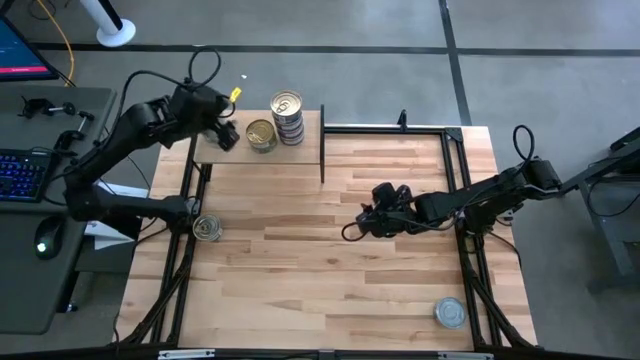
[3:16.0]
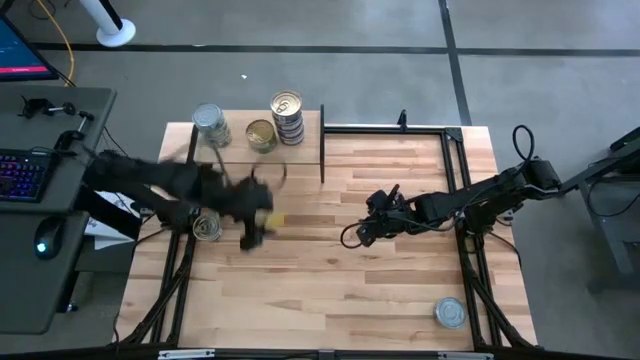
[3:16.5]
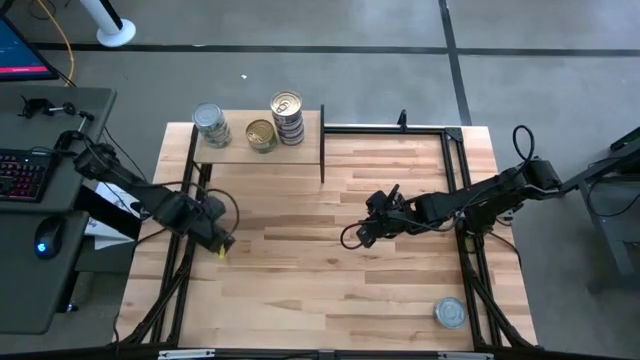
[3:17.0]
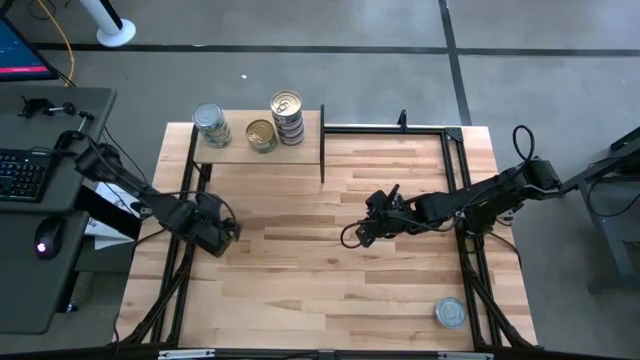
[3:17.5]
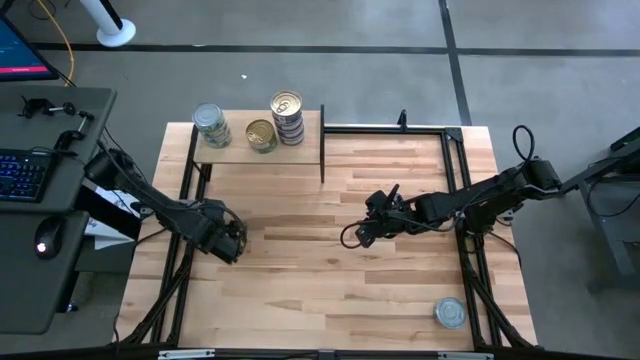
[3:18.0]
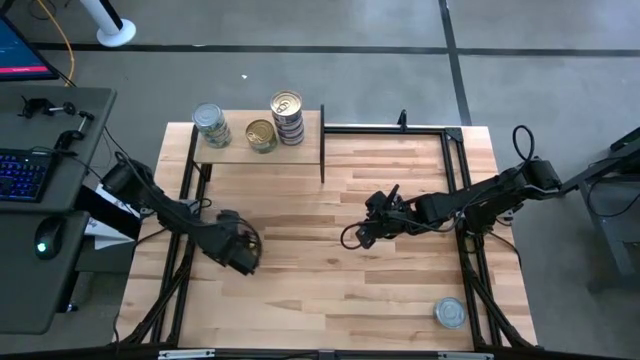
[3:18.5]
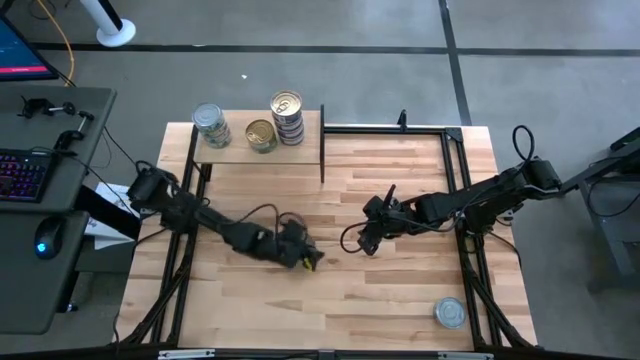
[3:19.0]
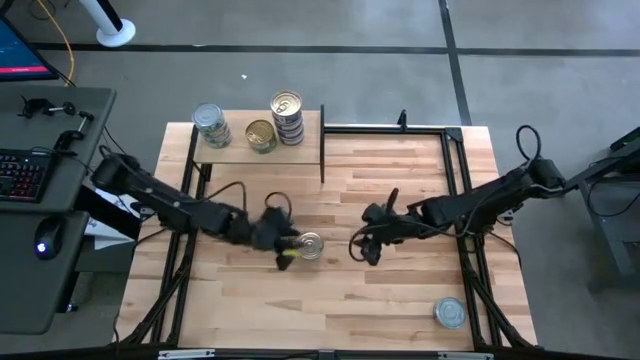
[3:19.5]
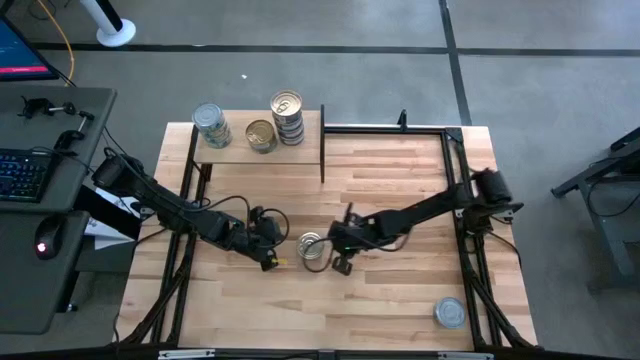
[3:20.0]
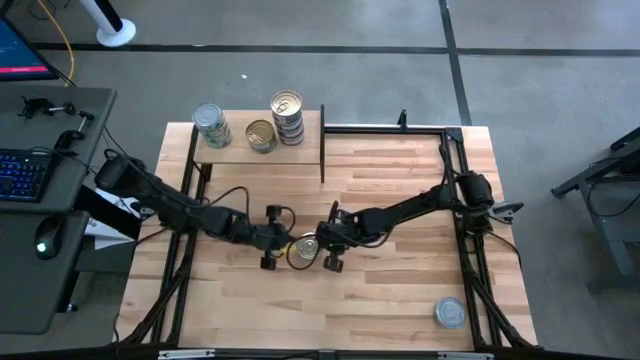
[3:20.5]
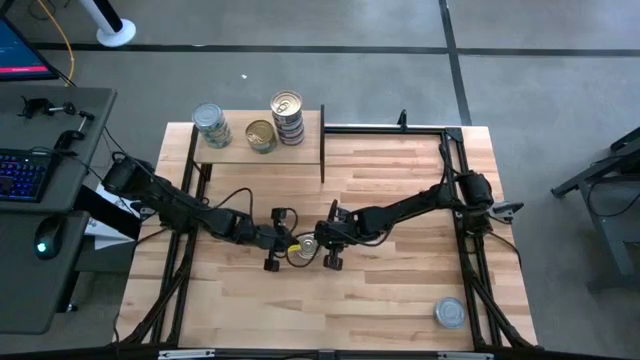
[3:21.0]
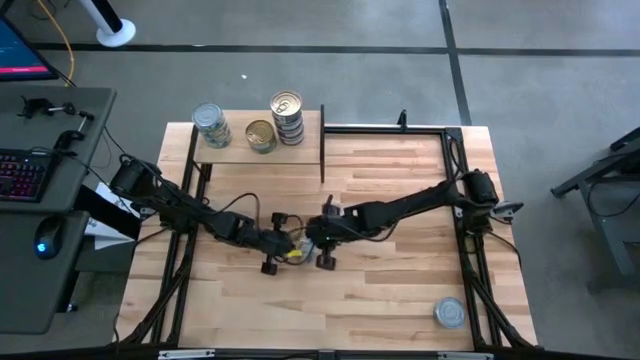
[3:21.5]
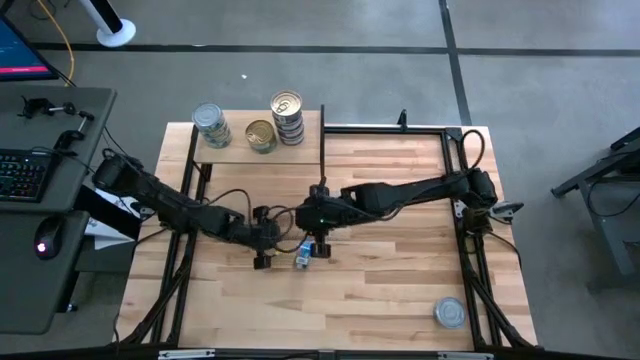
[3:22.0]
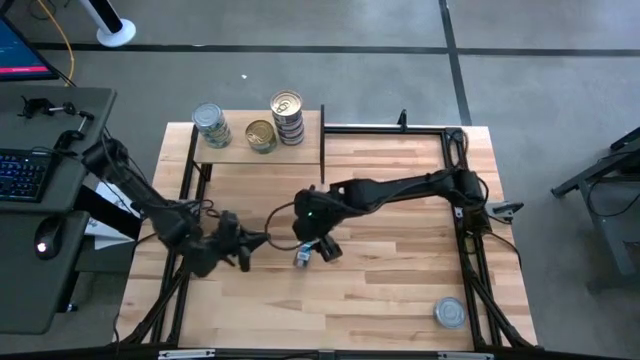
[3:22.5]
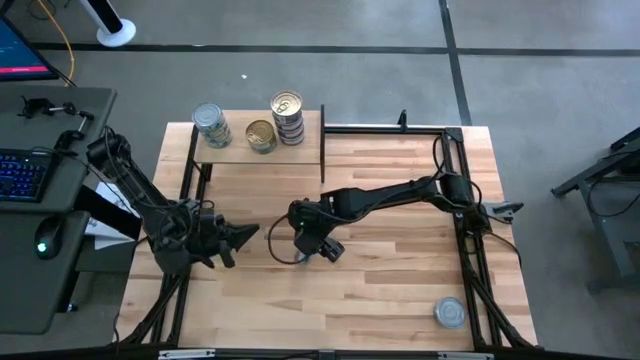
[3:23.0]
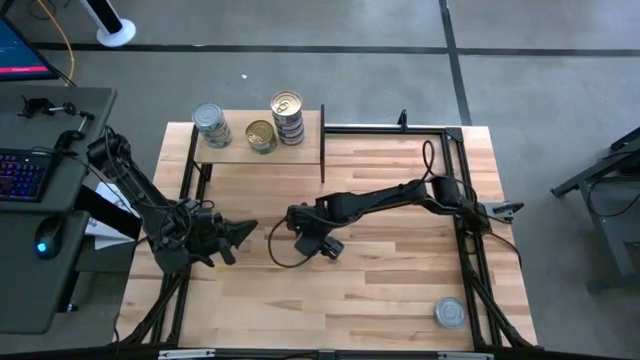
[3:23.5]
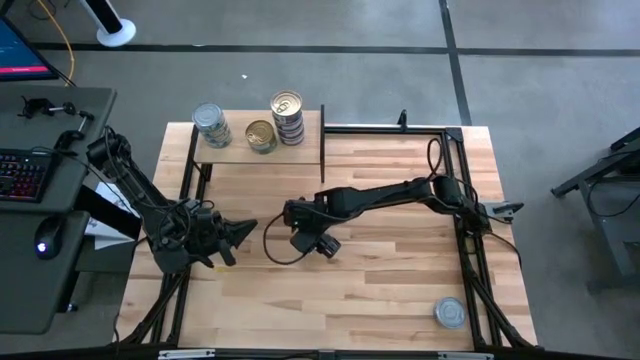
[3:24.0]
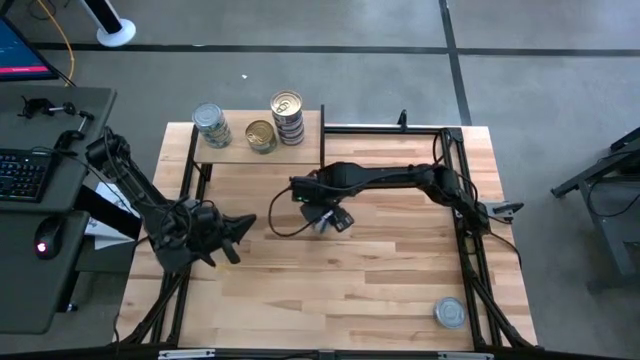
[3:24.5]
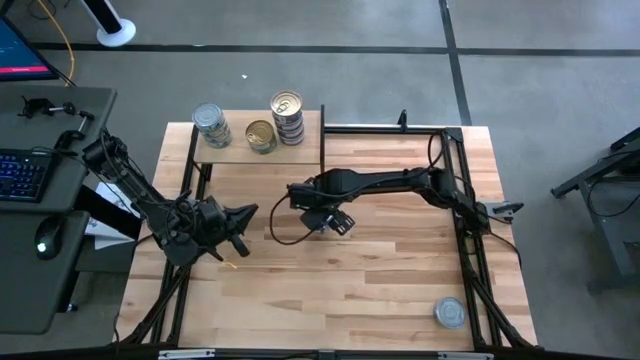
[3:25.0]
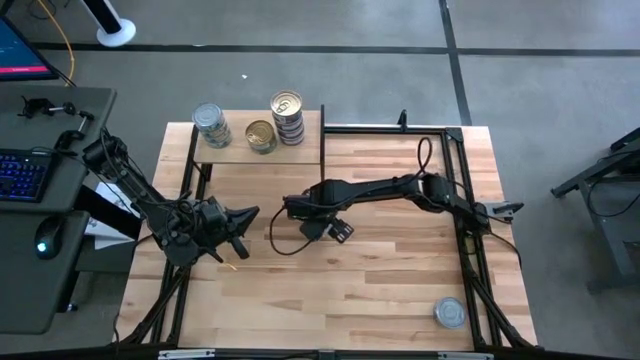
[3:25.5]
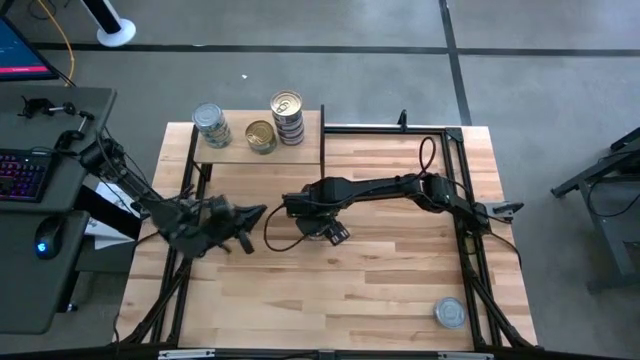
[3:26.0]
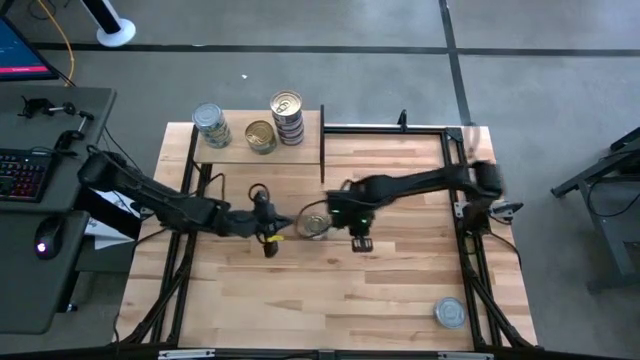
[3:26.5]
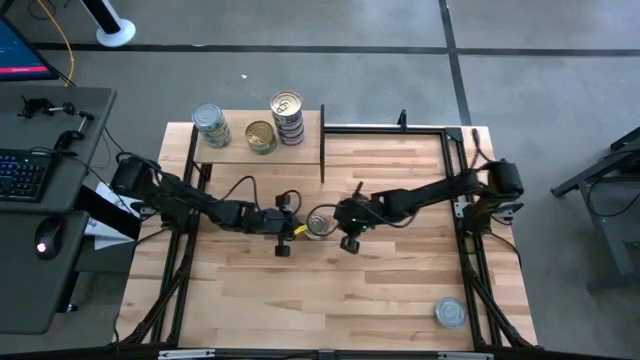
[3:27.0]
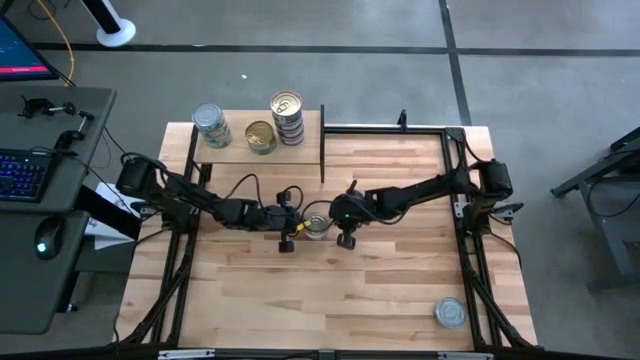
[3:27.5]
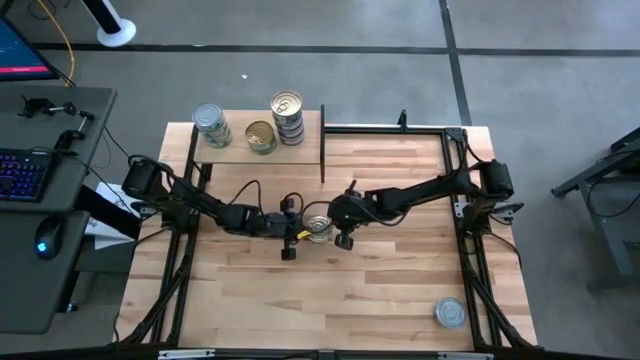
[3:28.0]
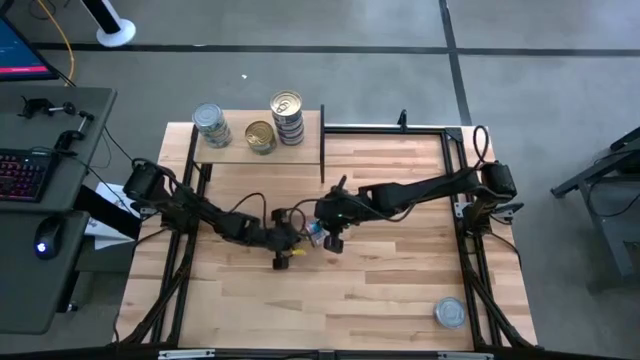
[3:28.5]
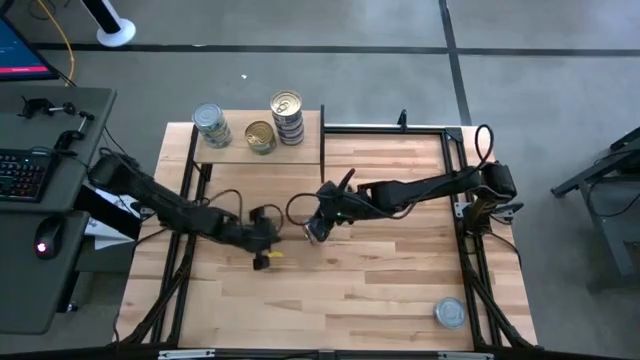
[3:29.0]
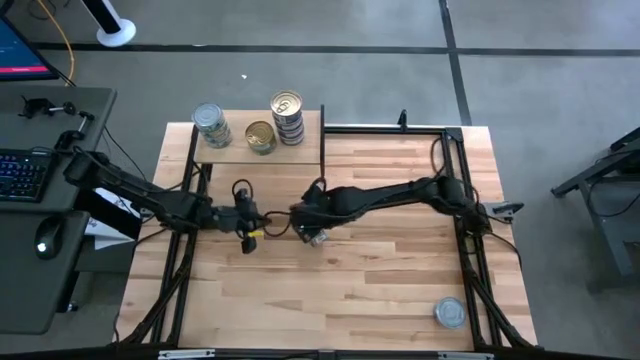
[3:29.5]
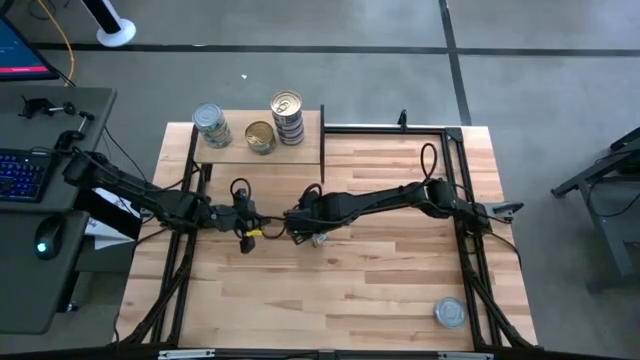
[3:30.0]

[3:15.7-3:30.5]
Task: Stack canned seafood by type on shelf
Stack the blue-pink tuna can on top of the blue-pink tuna cans on the shelf

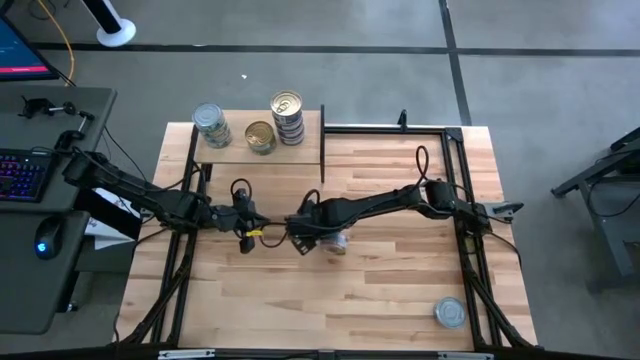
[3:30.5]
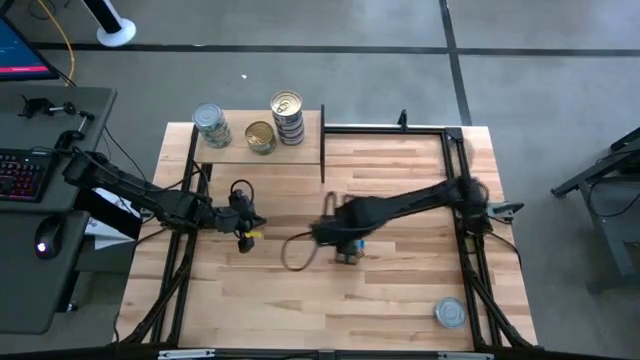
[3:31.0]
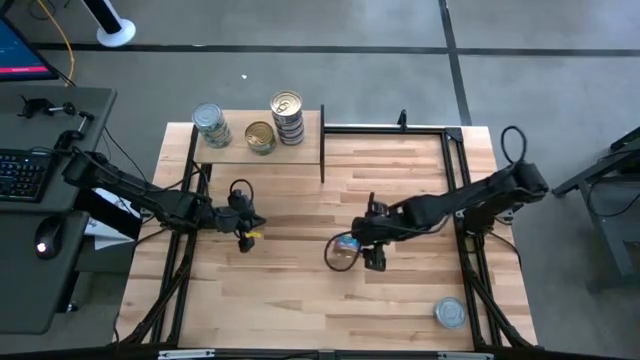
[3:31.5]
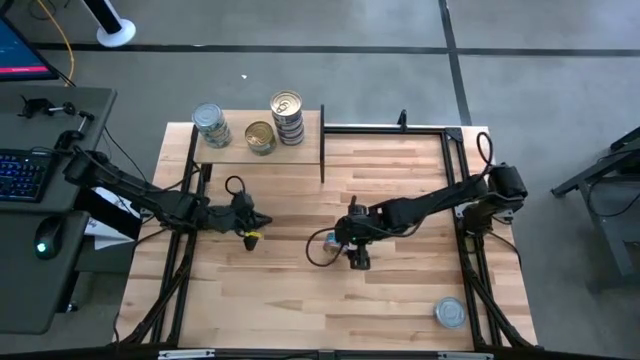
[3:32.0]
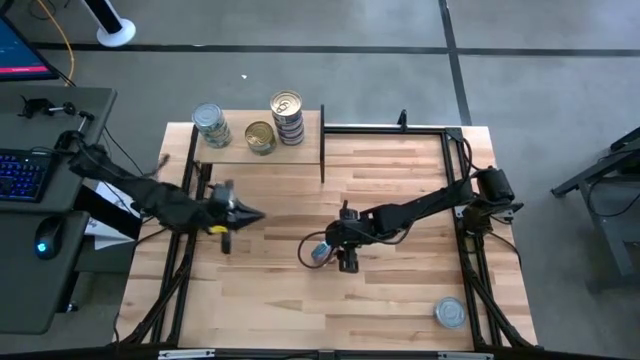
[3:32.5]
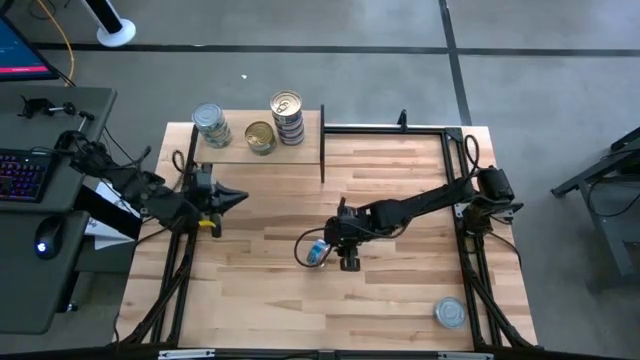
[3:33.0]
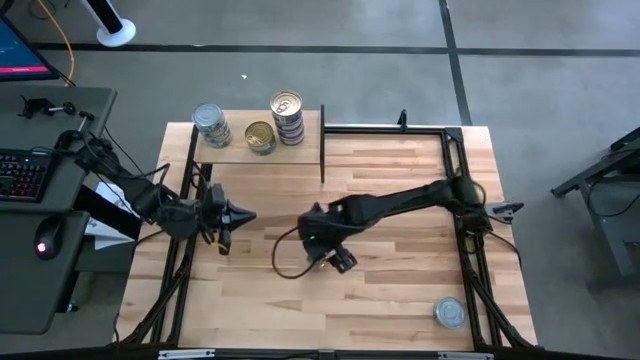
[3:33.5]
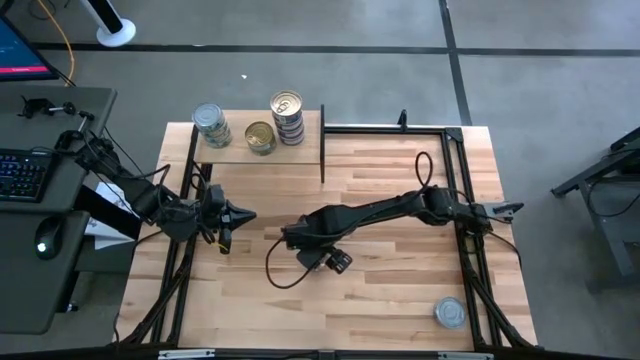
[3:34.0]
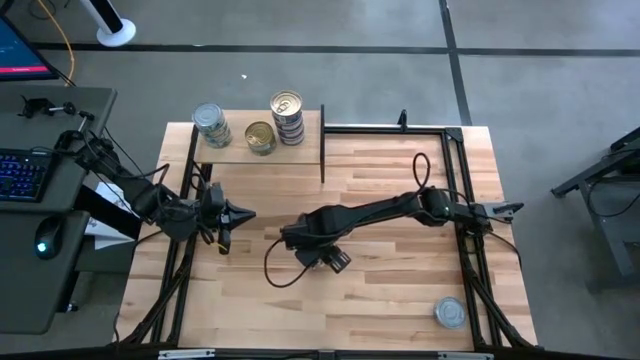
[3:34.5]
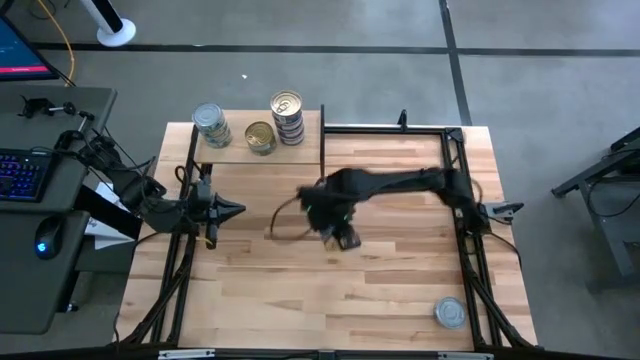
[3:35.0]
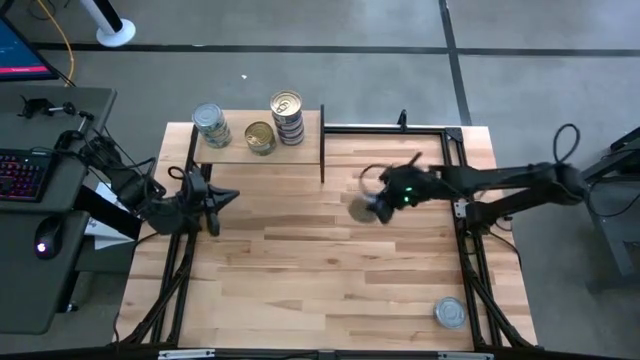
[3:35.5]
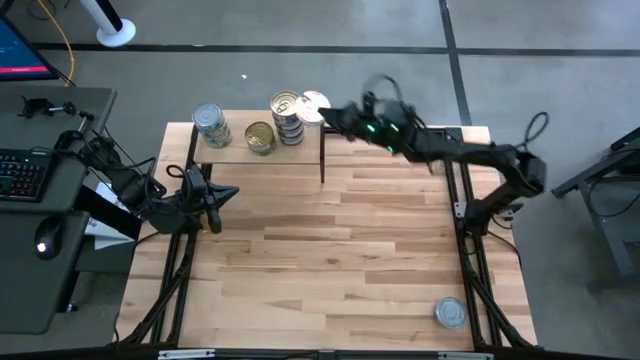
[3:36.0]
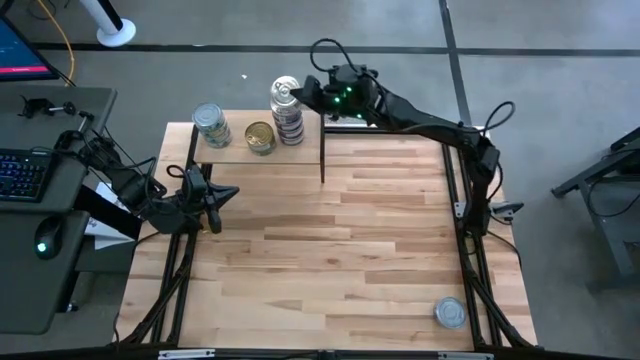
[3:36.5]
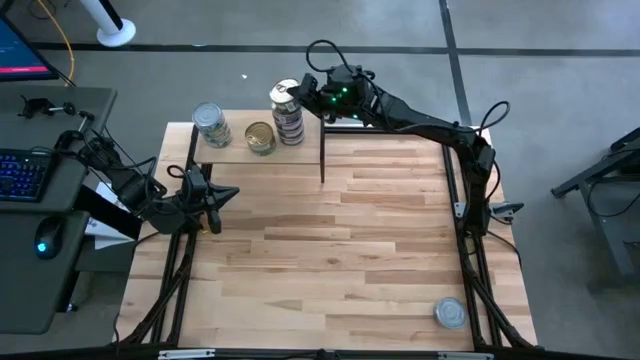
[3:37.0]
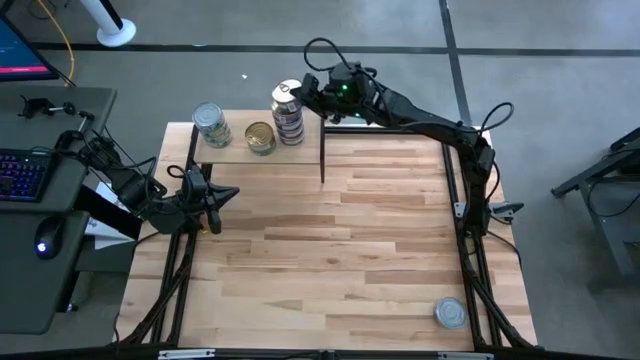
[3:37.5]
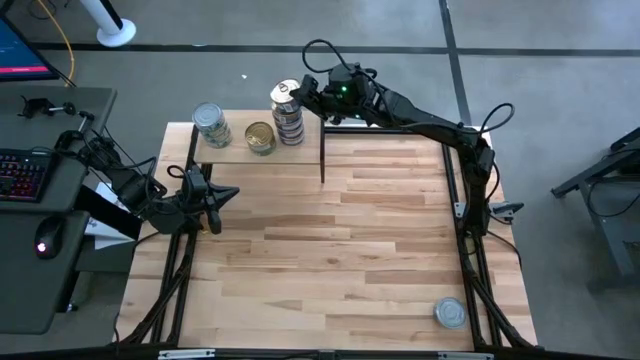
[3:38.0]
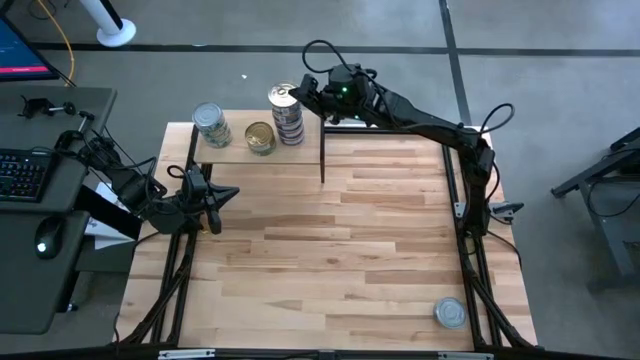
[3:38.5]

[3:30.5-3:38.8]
Stack the blue-pink tuna can on top of the blue-pink tuna cans on the shelf
